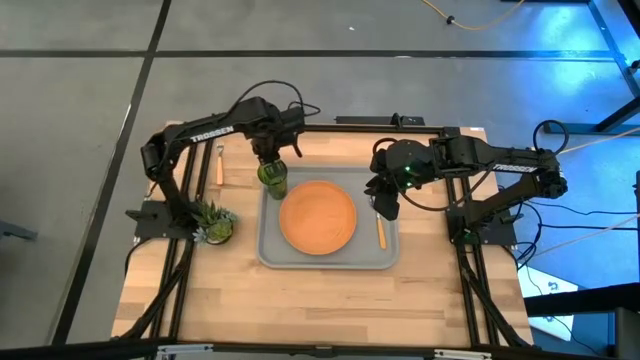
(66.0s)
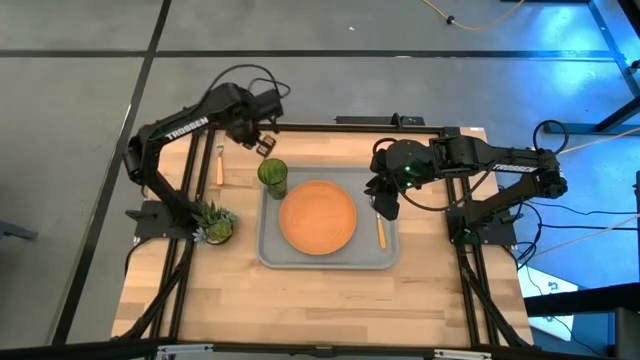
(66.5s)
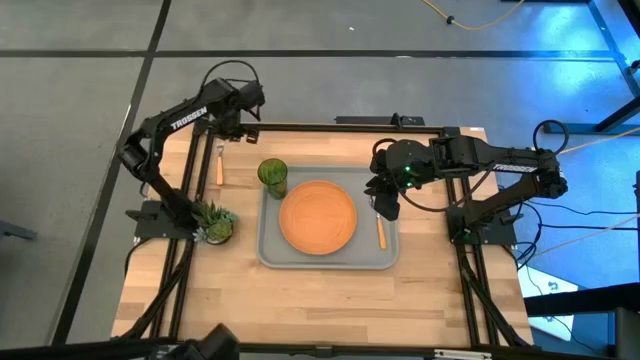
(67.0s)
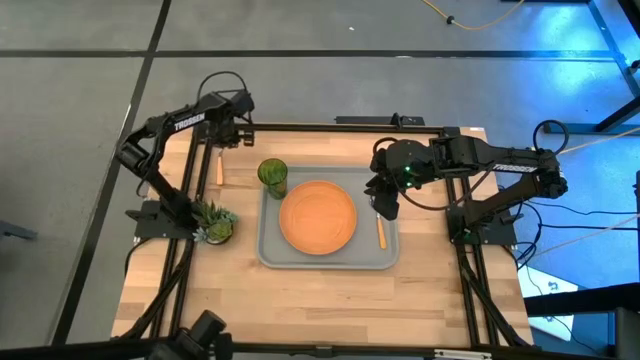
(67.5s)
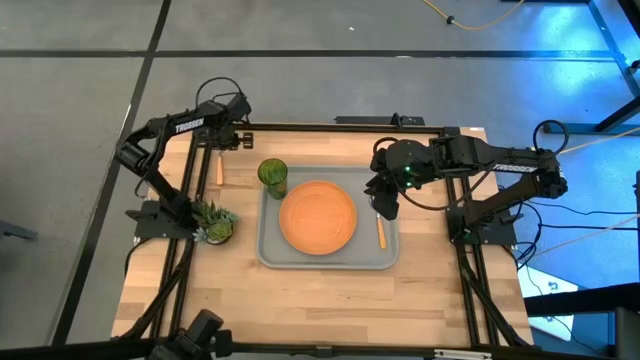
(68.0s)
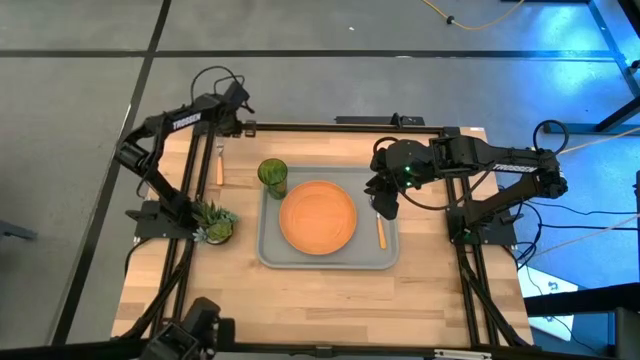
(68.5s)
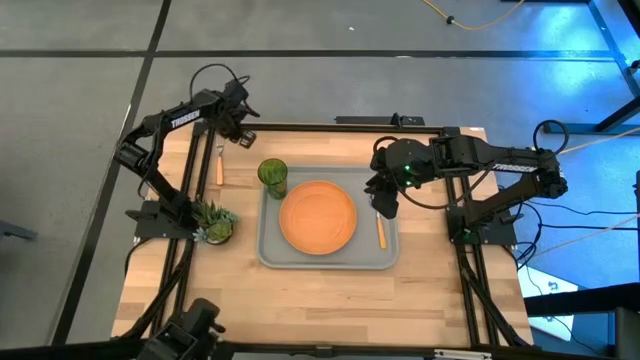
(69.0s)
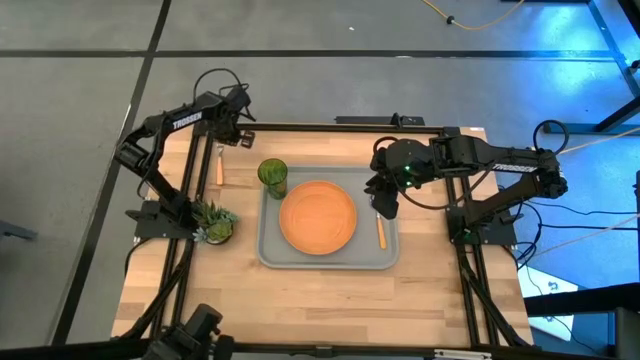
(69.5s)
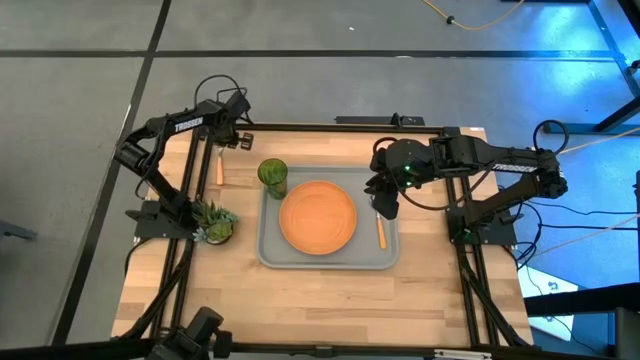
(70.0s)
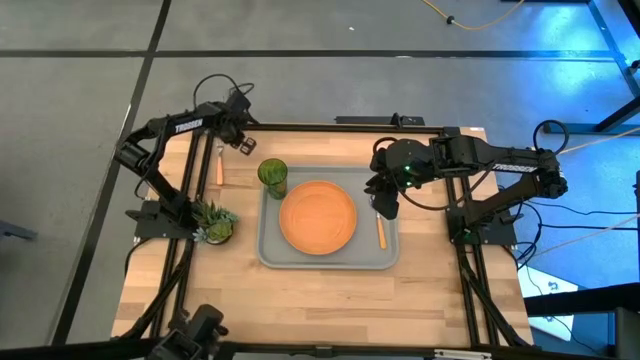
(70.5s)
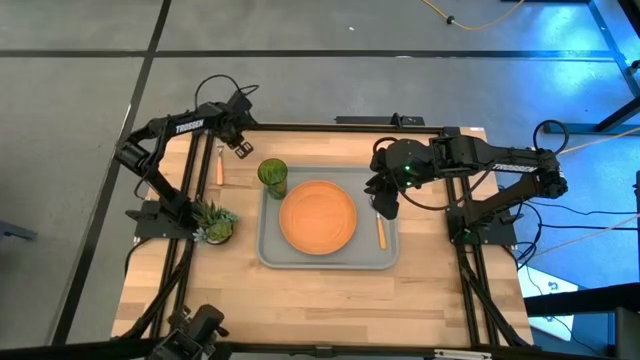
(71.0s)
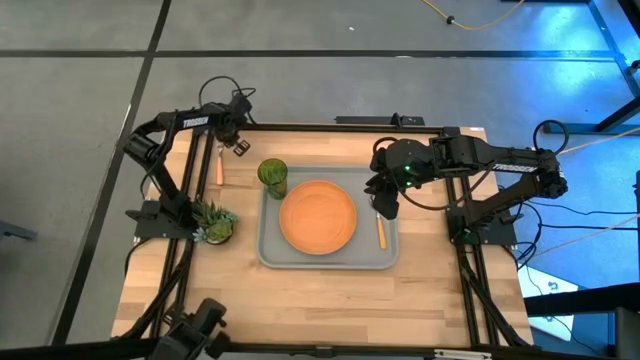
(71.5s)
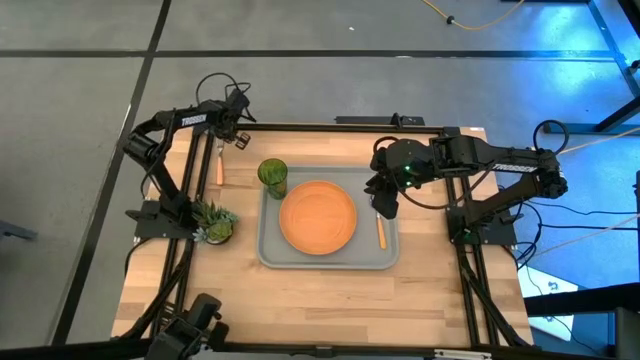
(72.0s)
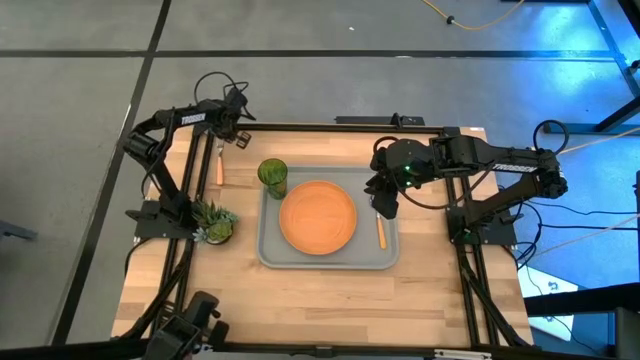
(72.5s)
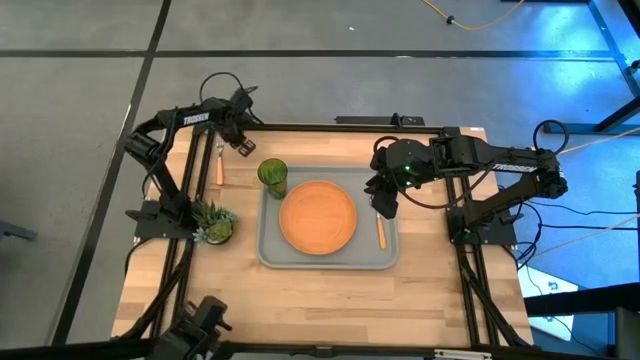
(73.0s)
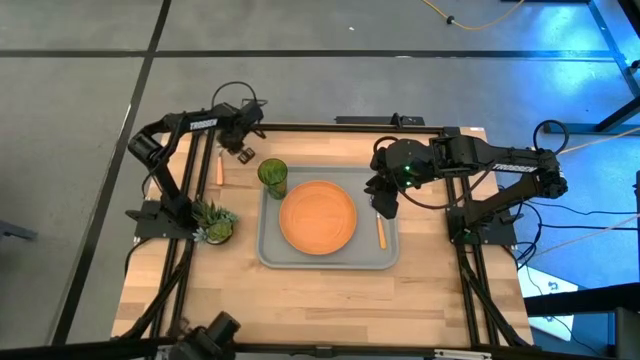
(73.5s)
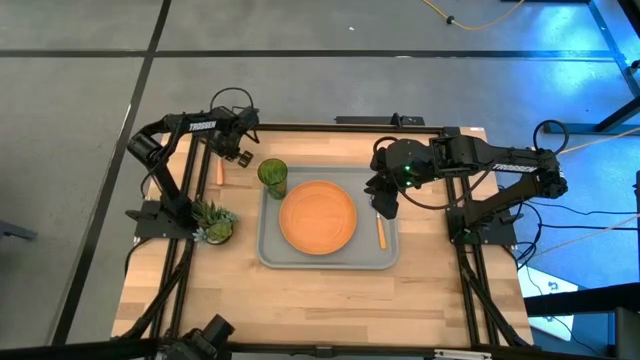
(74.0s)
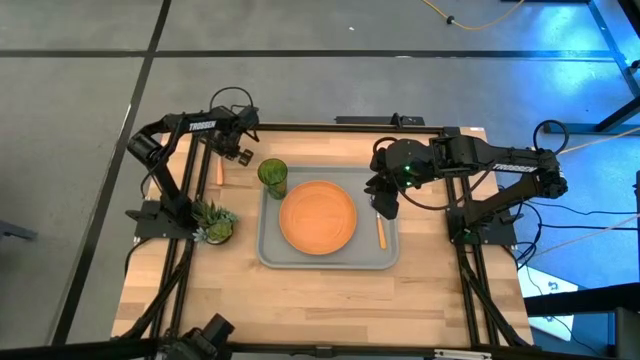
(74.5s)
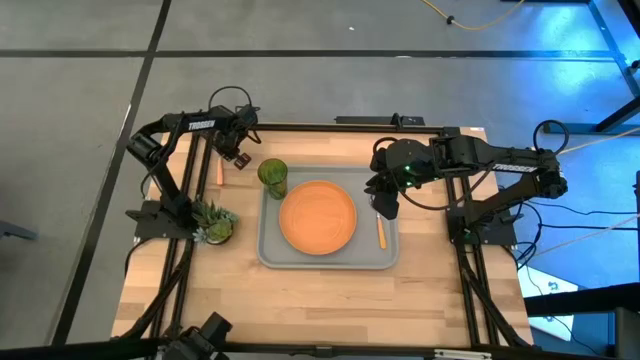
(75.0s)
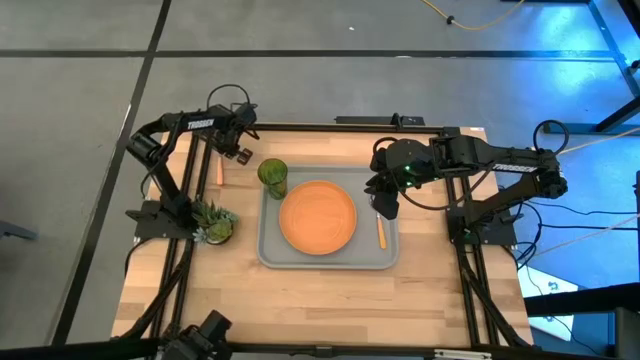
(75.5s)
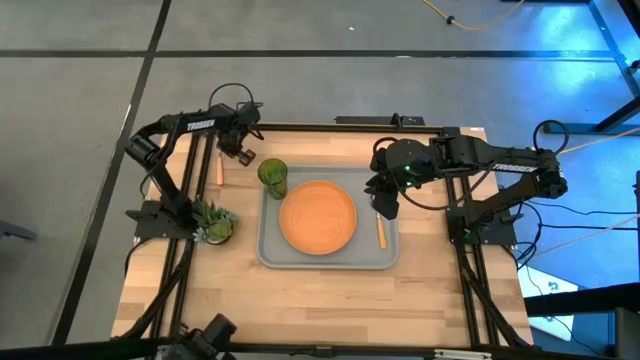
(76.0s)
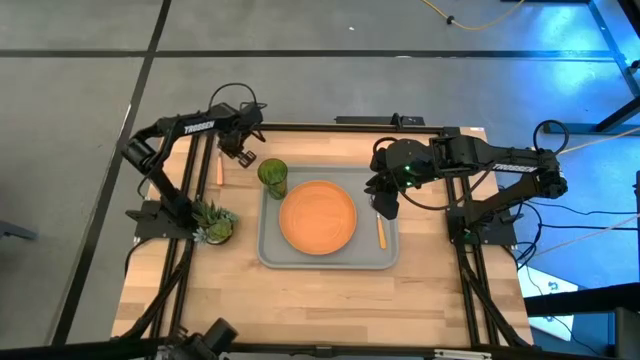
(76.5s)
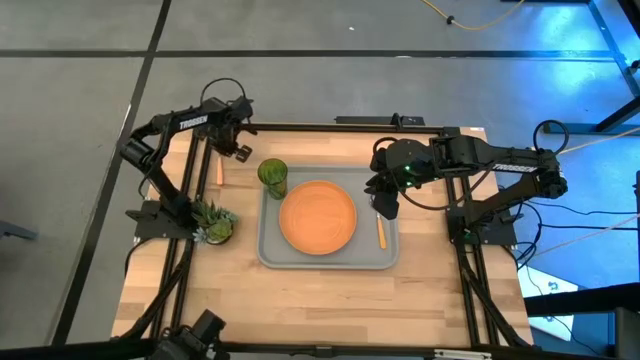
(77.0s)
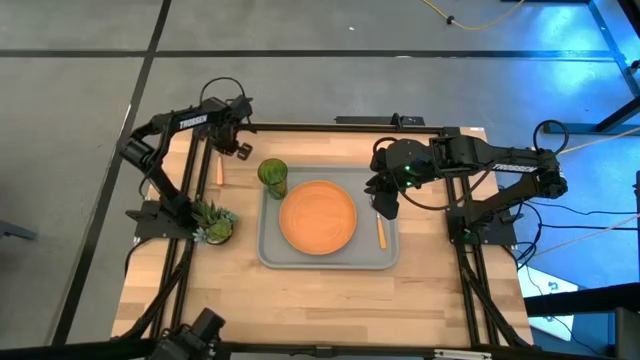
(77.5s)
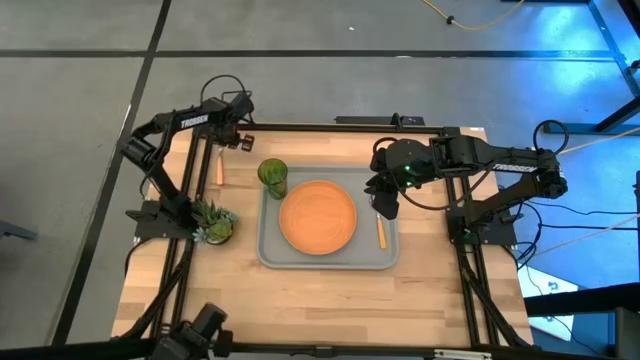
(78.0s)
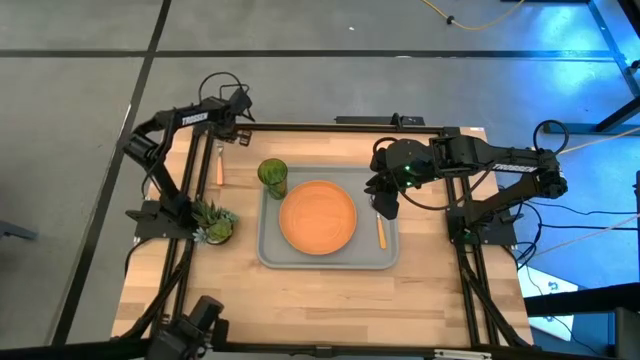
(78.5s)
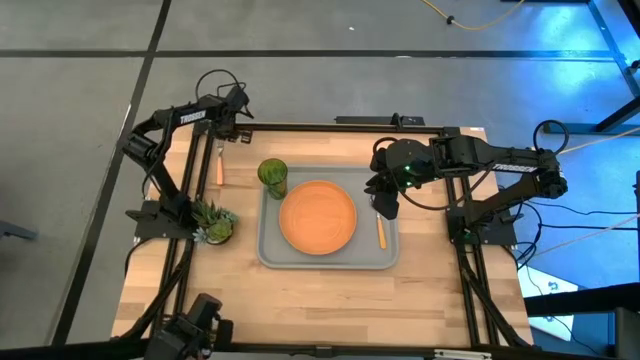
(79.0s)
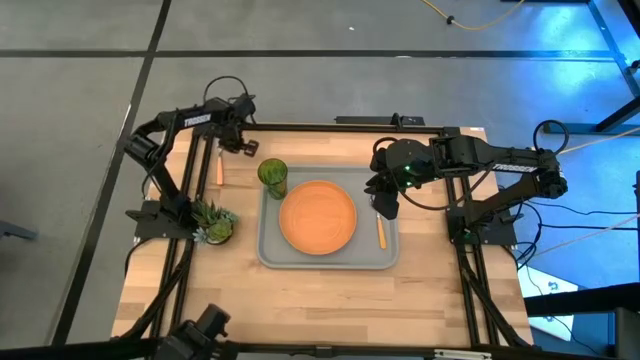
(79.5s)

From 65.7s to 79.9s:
Task: Pick and place plate/cup/fork/spoon on tray
Put the orange fork on the gray food tray to the right of the orange plate

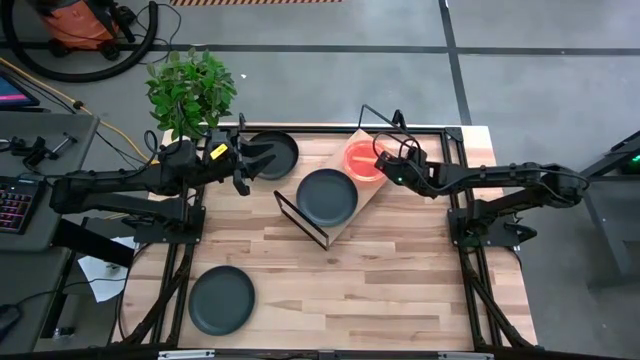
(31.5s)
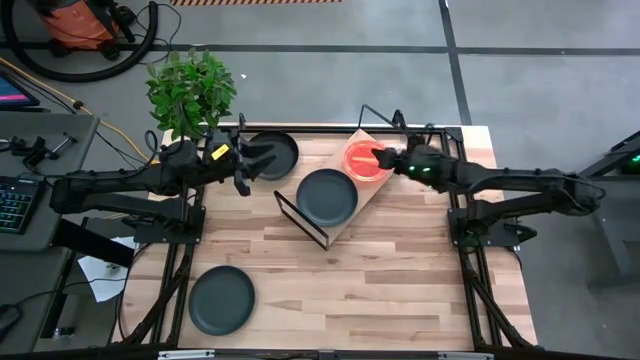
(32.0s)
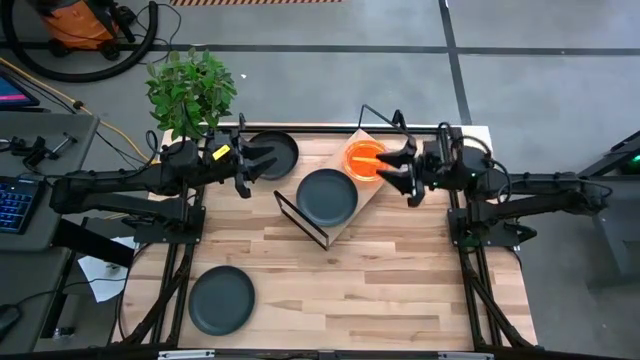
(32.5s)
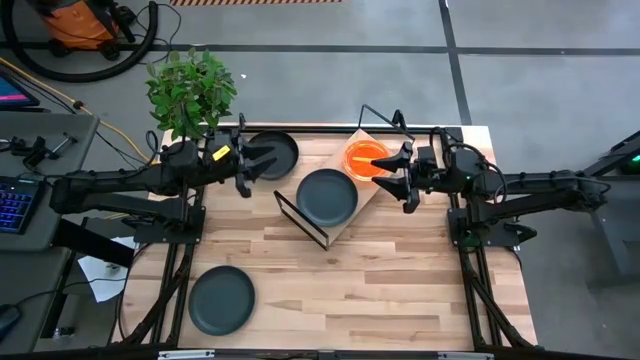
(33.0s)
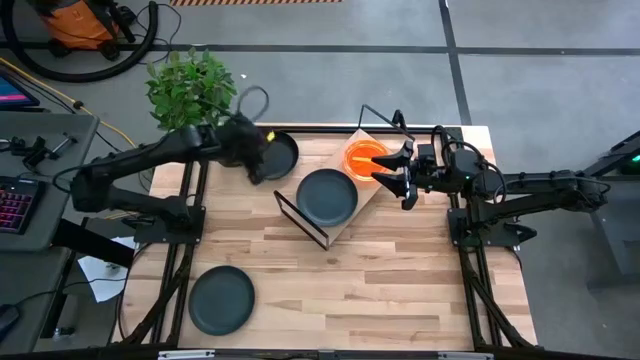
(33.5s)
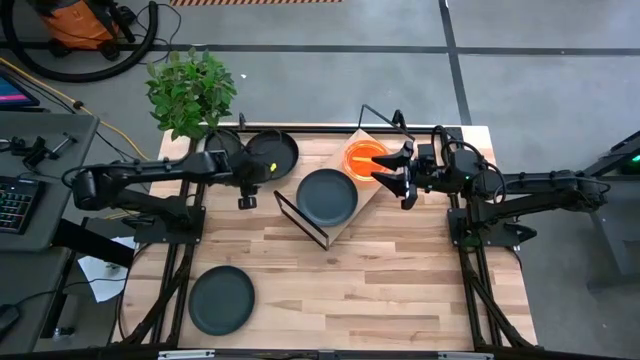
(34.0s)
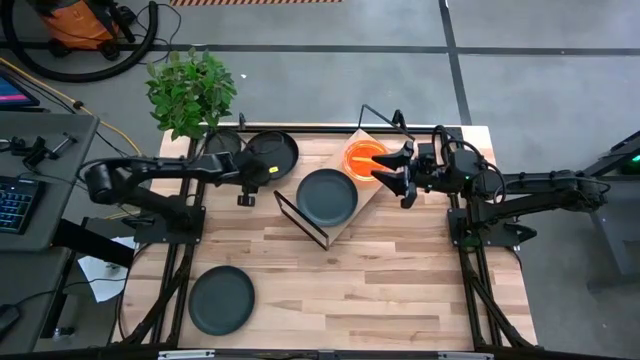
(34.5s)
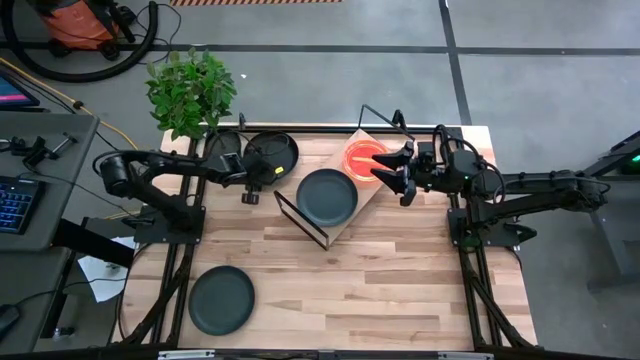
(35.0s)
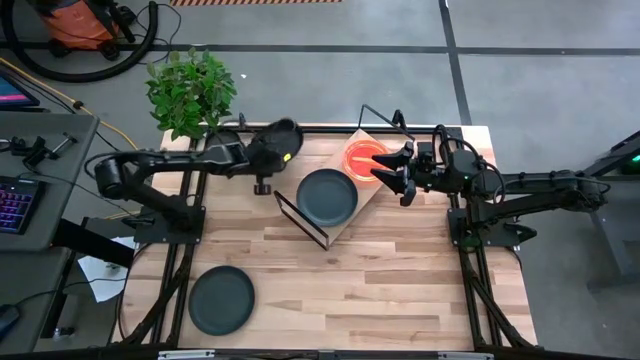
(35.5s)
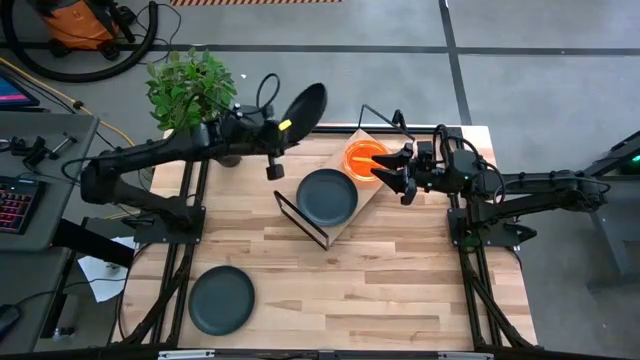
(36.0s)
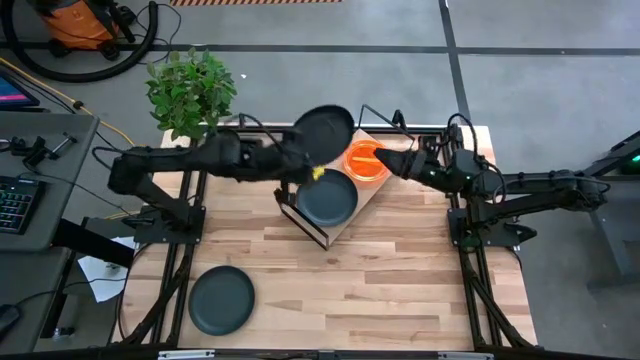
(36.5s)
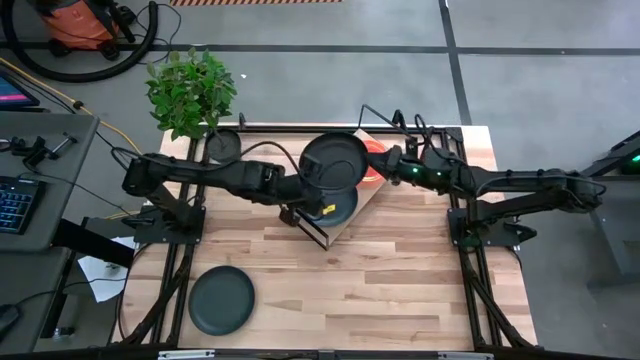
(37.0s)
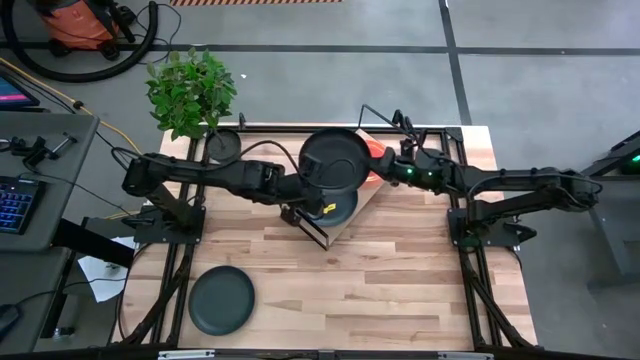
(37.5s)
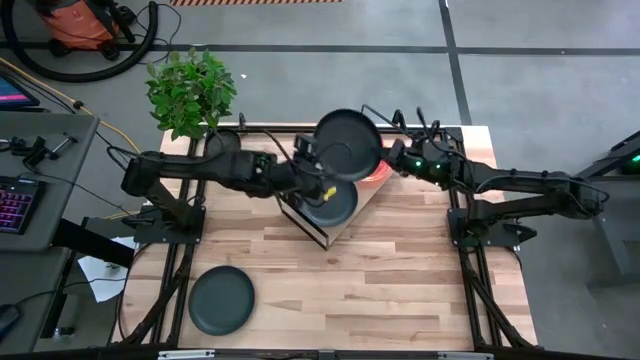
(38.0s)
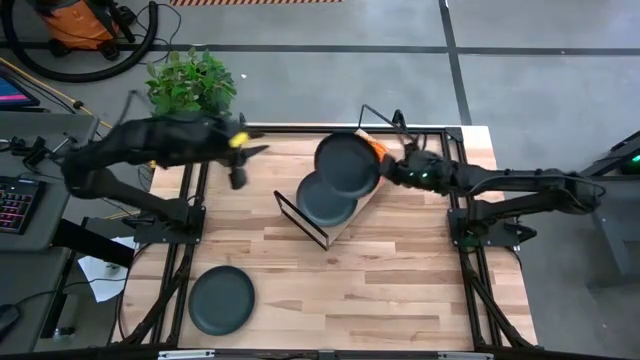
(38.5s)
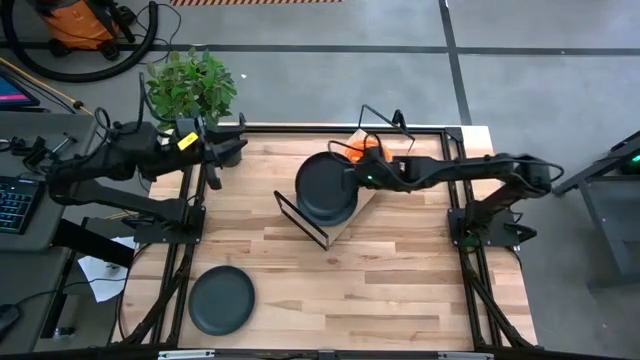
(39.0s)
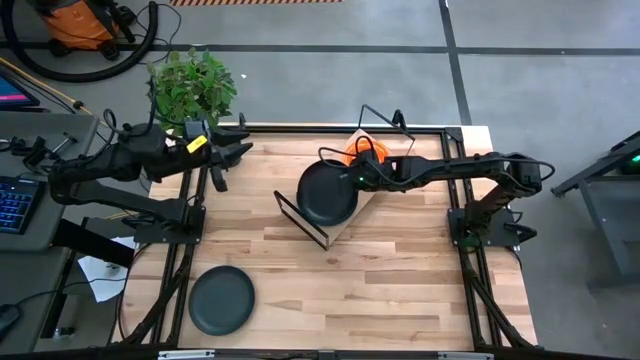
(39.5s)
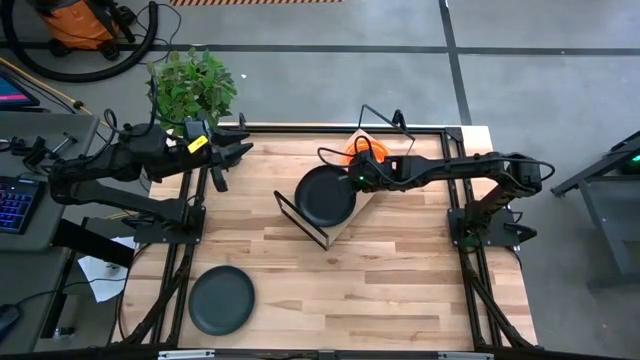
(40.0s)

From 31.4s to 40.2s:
Task: Place and stack plates onto a shelf
Stack the top black plate on top of the black plate on the shelf
